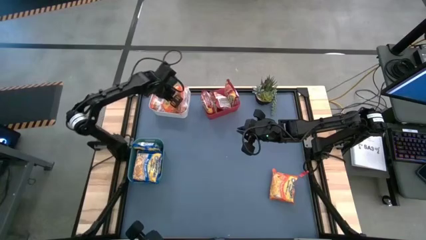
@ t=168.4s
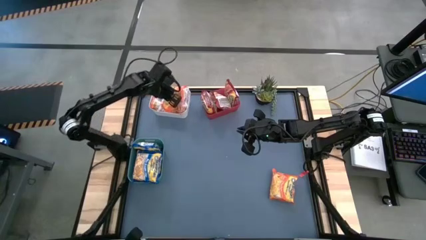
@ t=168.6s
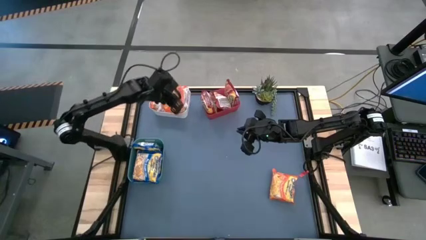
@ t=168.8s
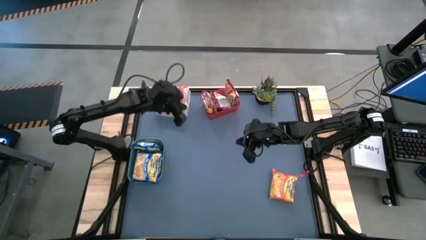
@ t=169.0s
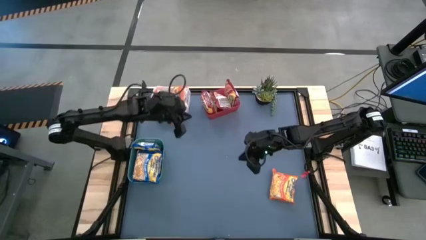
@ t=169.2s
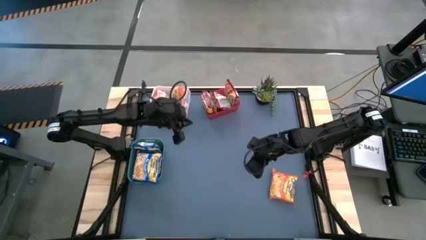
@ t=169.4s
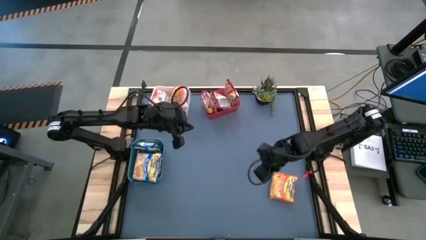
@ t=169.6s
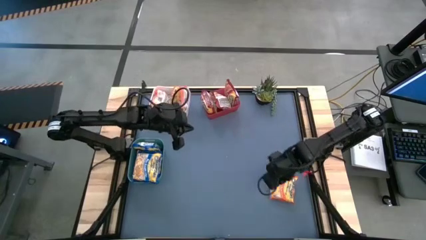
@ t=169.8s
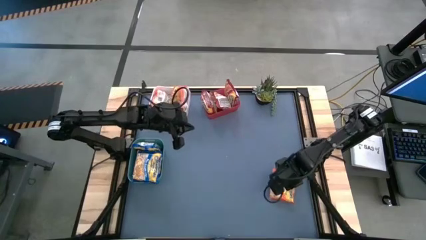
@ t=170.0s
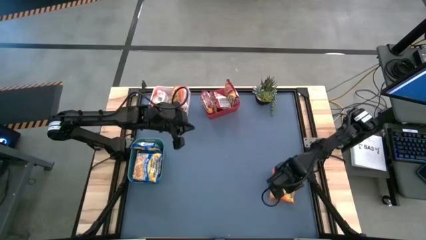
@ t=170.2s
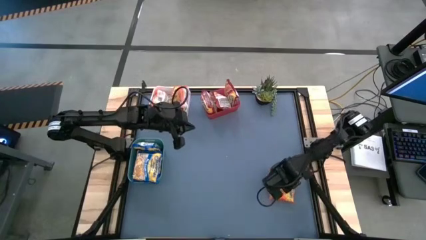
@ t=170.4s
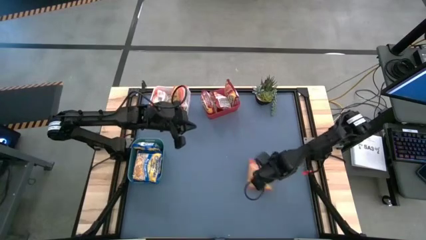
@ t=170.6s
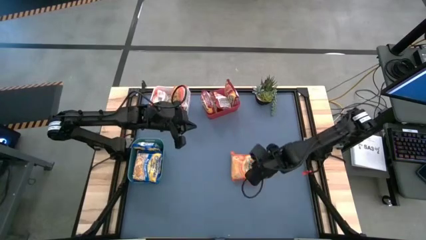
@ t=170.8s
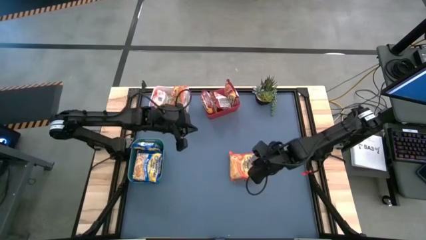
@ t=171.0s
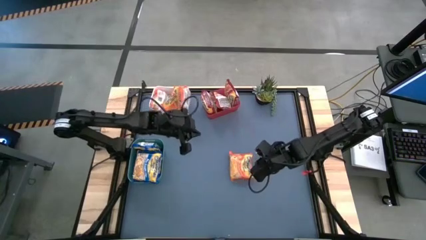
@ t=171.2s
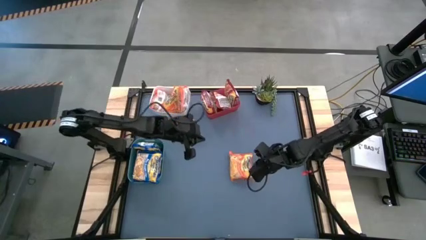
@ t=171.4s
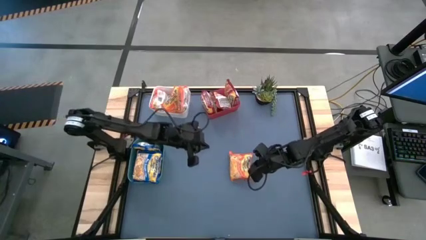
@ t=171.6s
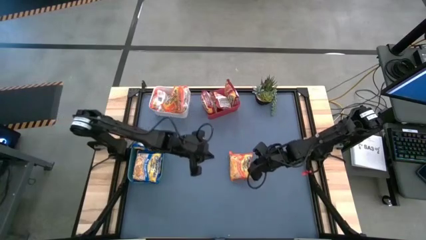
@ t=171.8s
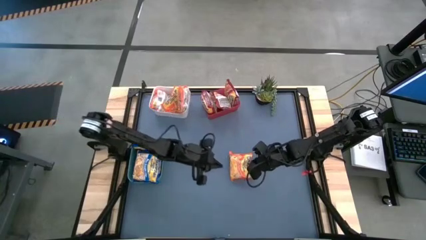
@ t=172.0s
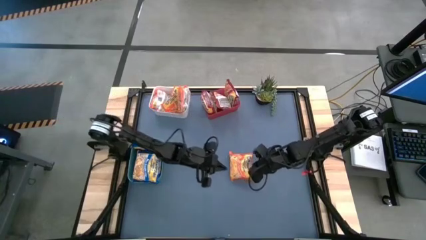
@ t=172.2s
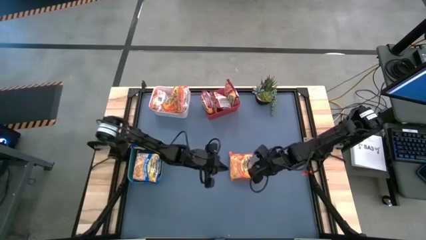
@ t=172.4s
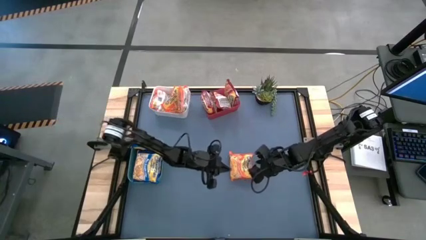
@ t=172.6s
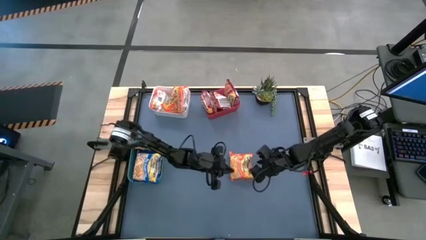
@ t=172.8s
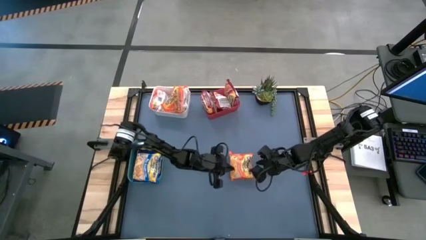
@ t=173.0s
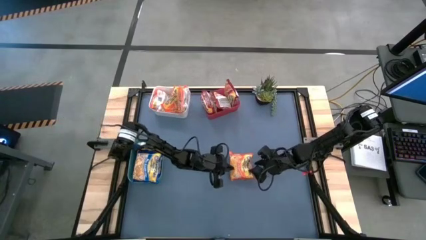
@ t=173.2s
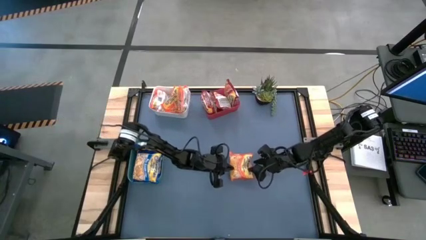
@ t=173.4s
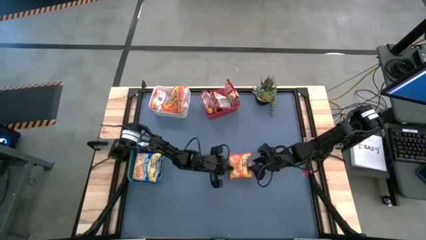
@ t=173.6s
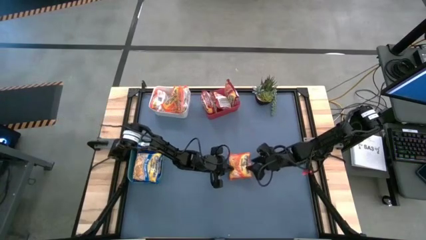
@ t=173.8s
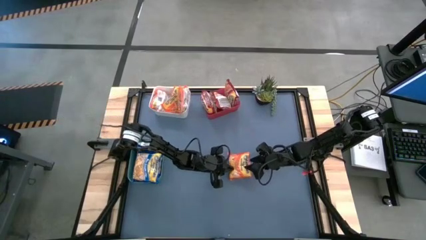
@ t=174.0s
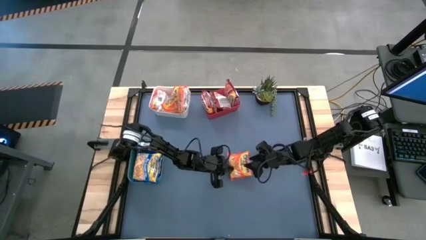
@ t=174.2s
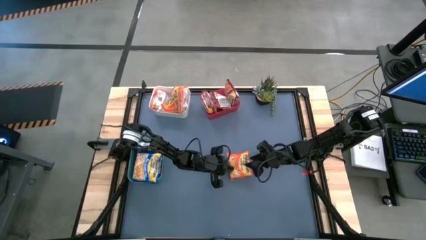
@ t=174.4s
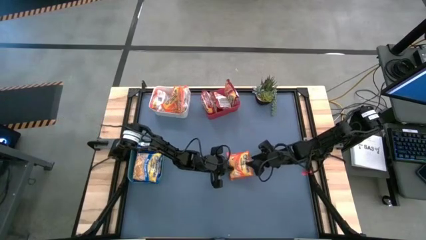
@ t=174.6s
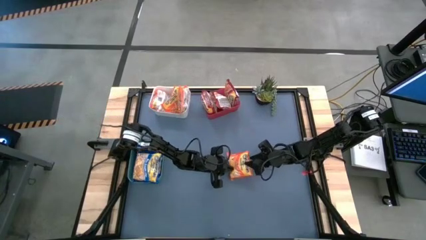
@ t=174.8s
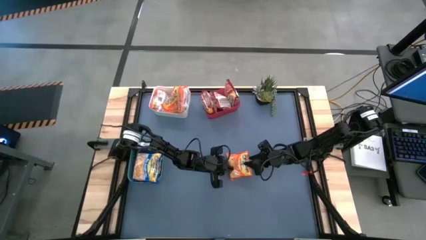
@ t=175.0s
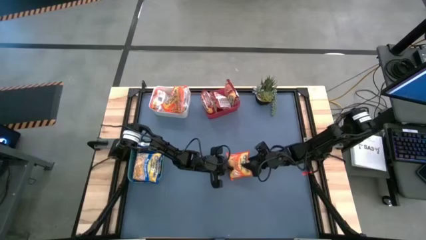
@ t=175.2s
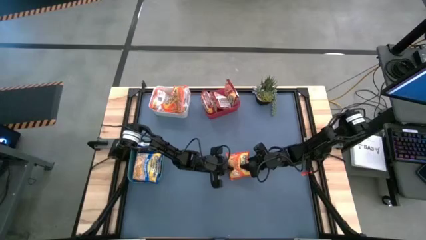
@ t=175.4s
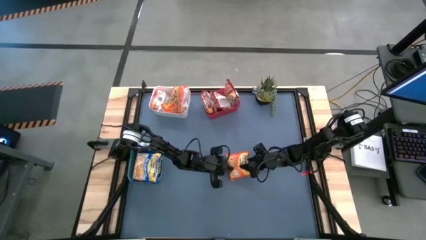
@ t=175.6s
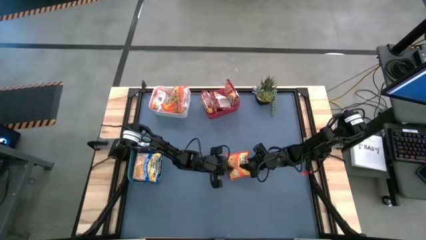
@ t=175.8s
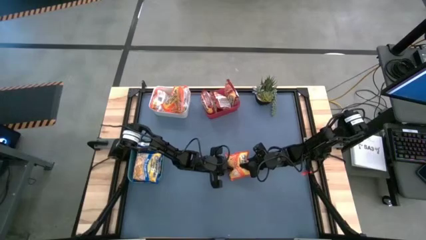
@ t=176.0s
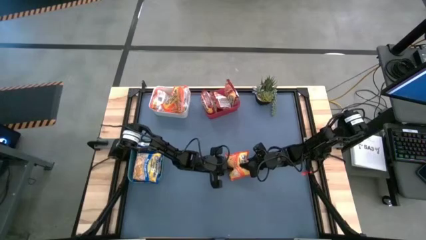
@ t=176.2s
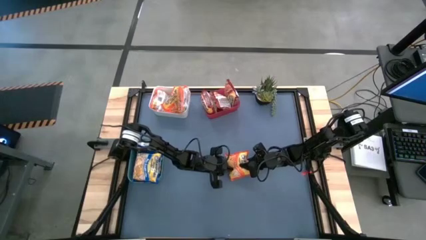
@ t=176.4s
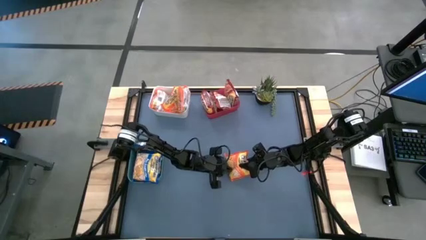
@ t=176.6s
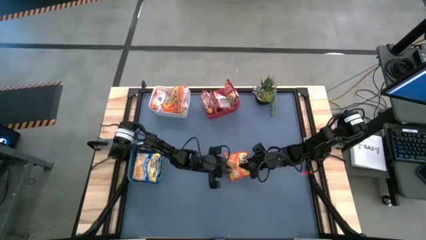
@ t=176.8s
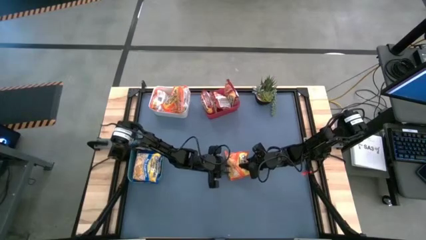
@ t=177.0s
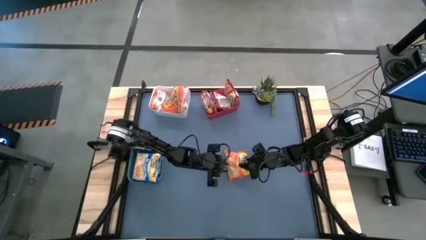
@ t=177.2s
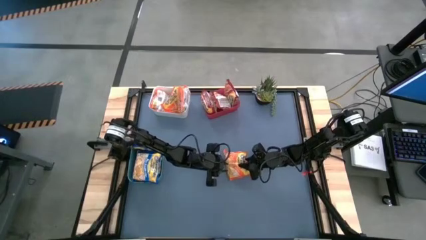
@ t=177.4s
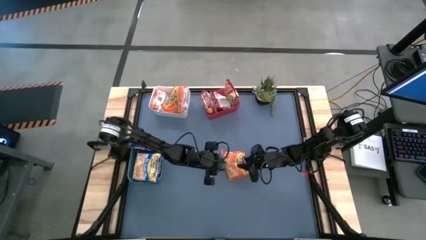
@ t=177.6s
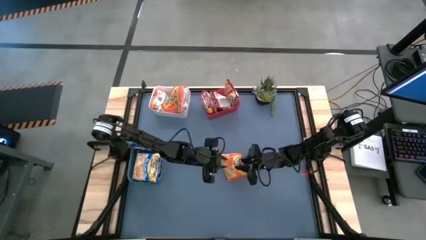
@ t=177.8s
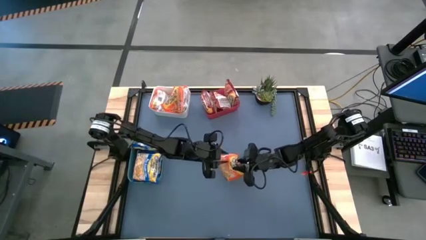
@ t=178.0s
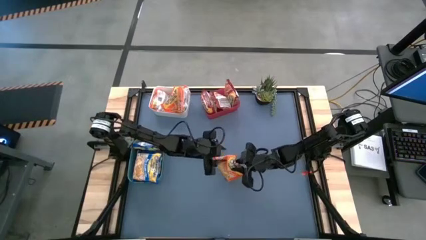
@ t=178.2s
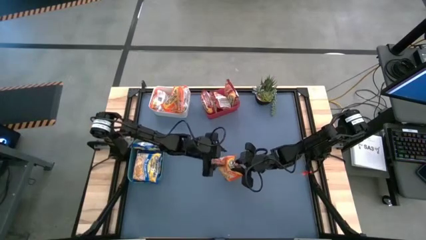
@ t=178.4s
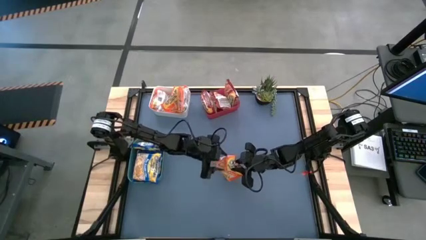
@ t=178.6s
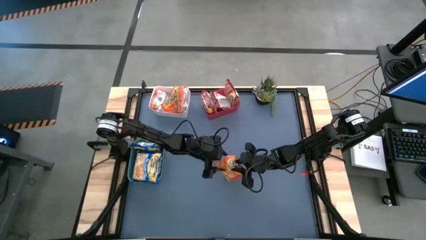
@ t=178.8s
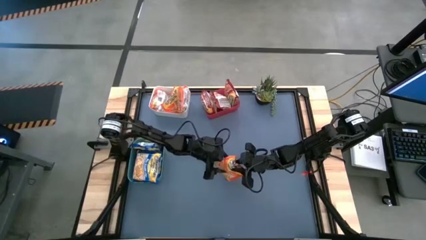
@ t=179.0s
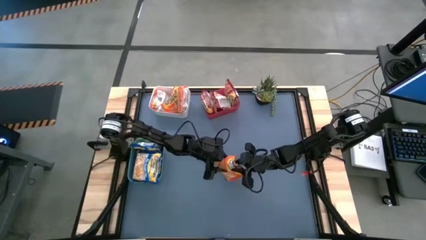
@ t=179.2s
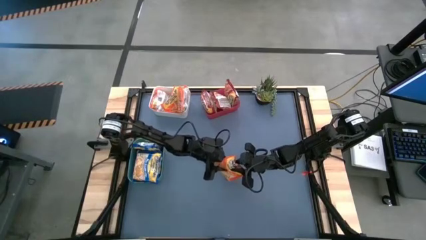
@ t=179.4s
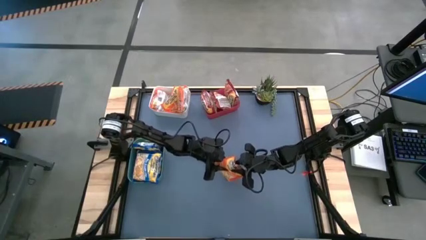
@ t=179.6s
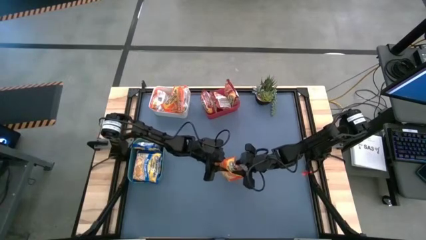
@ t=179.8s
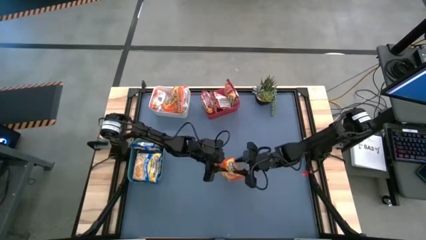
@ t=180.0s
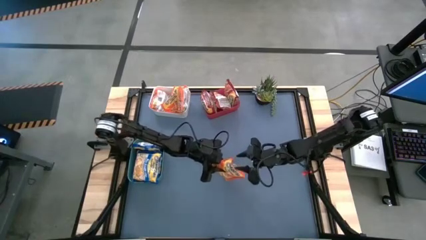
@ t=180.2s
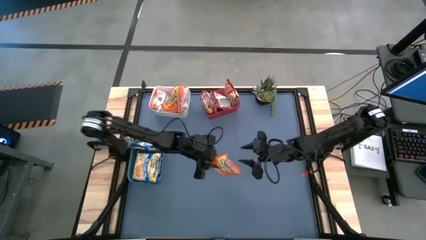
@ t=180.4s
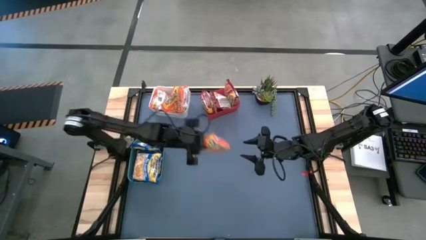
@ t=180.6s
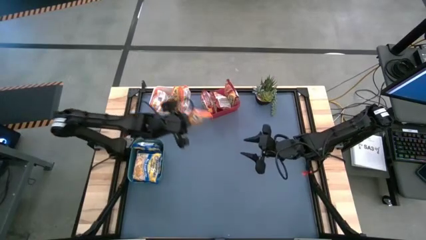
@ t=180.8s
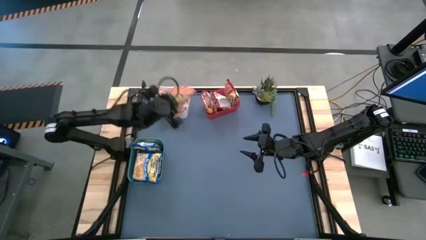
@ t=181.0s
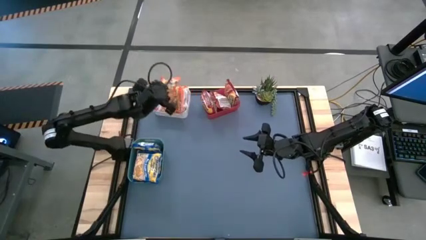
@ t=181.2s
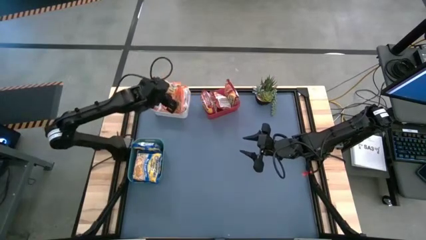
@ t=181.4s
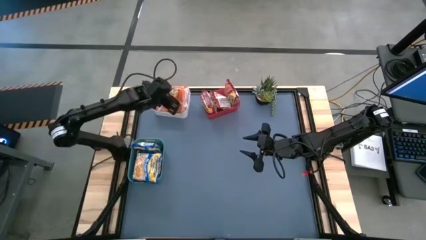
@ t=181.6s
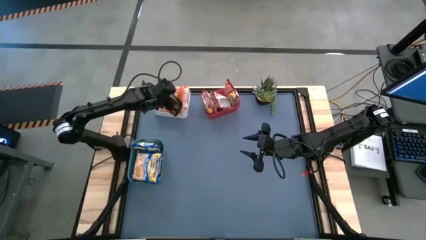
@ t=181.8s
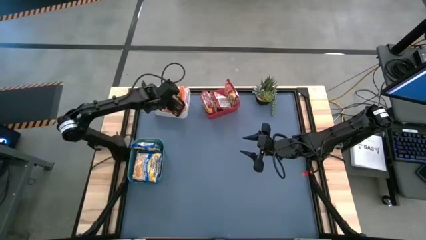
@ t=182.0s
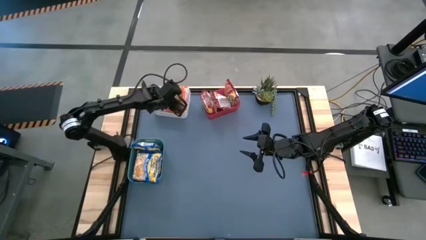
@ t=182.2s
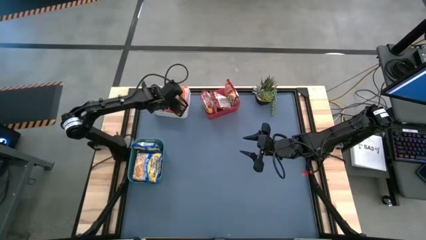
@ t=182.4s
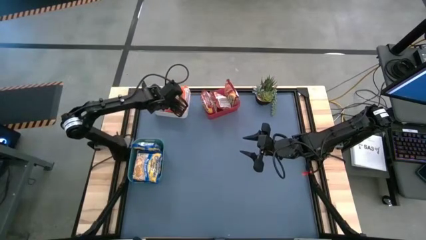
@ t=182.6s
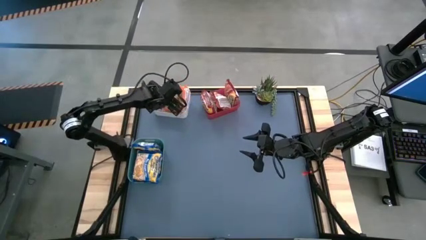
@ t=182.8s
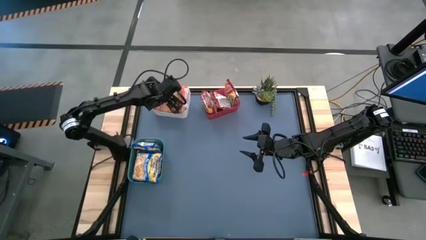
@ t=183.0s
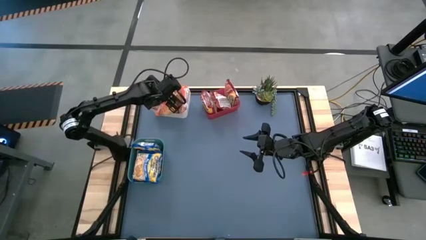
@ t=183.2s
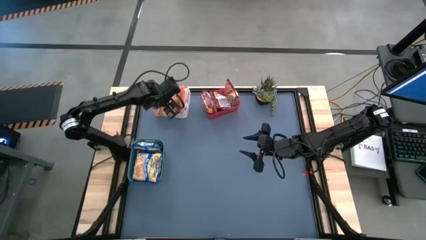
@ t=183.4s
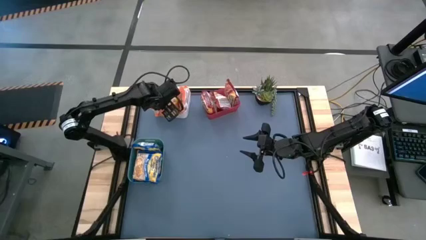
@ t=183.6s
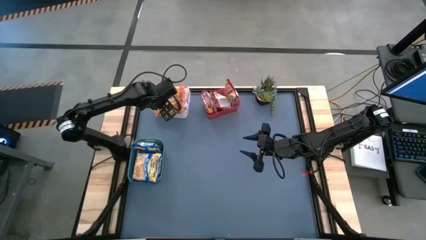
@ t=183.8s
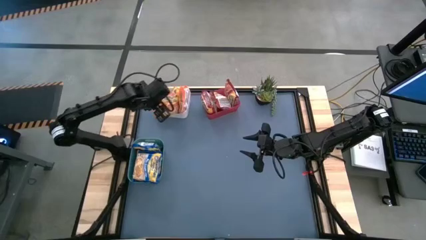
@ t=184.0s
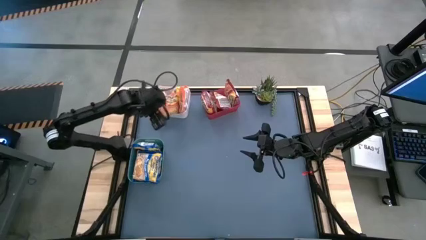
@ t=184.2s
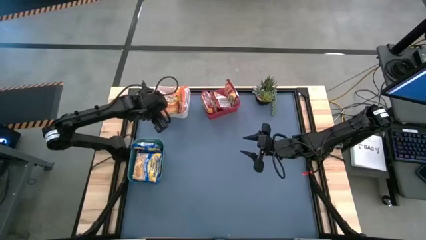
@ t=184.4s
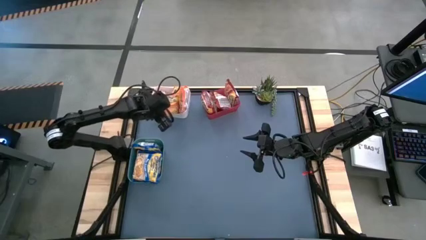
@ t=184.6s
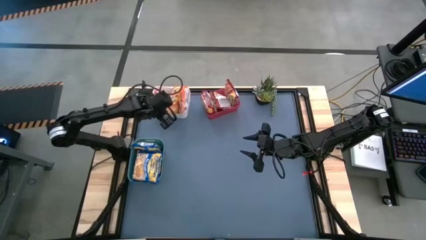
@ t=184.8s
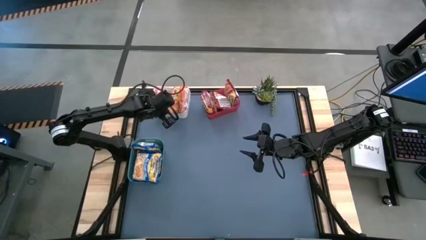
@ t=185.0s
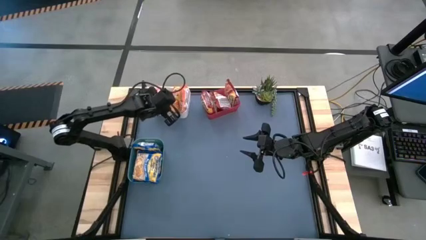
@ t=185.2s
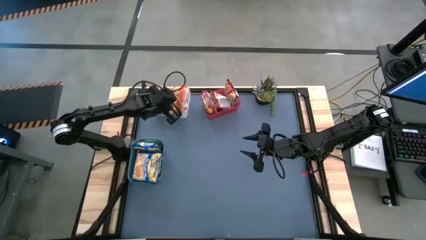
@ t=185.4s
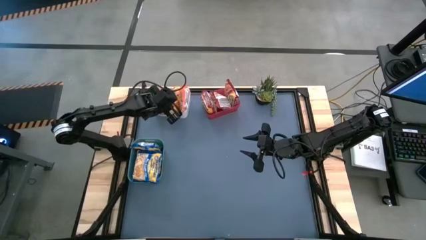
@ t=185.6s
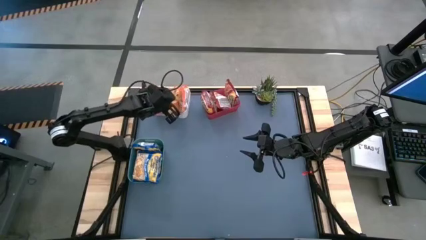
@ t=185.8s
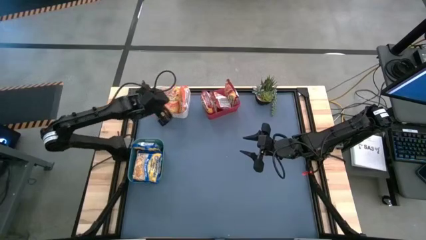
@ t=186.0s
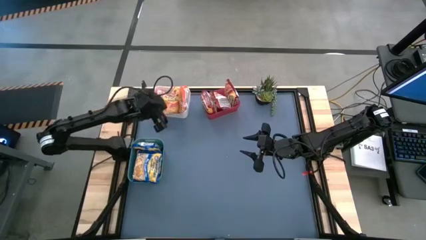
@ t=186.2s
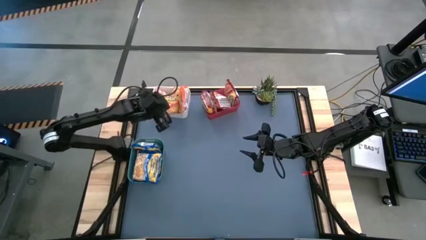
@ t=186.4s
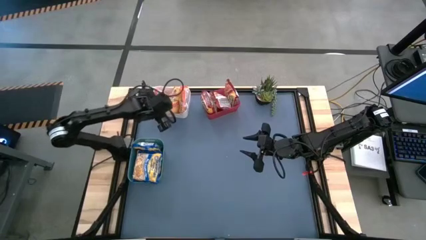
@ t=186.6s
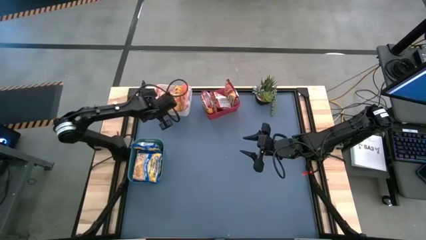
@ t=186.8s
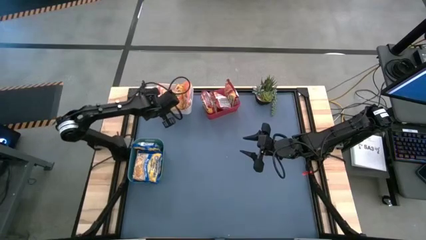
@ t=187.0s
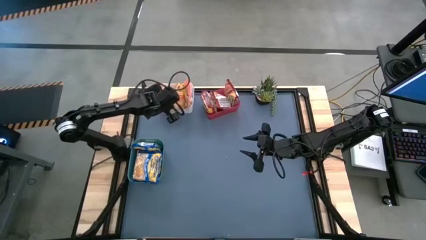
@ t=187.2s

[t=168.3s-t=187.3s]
Task: Sort Maruchan noodles
Put the orange noodle pack into the white bin
